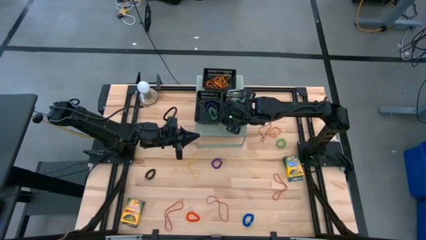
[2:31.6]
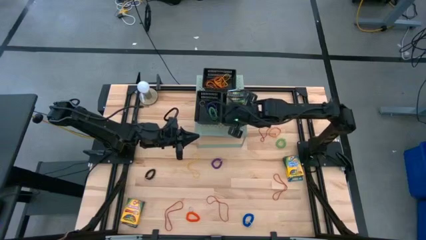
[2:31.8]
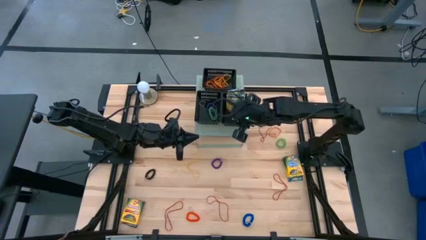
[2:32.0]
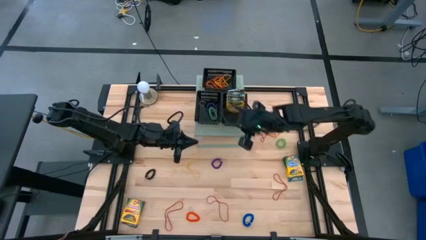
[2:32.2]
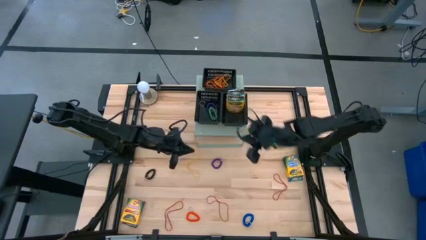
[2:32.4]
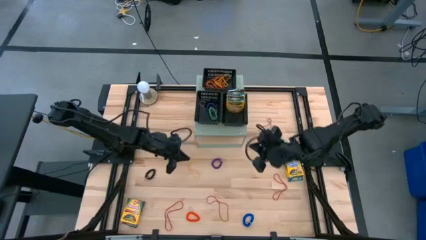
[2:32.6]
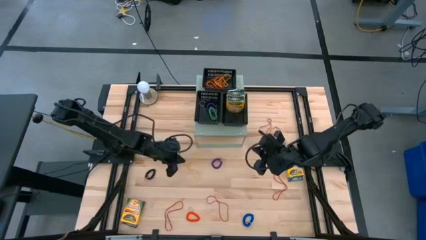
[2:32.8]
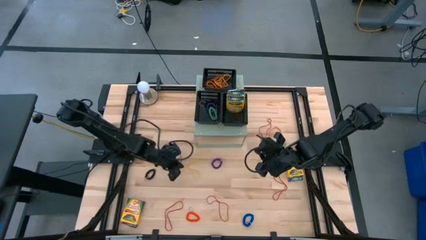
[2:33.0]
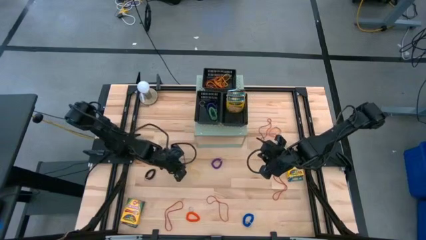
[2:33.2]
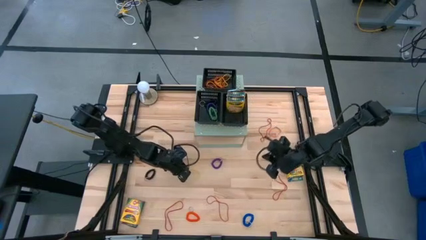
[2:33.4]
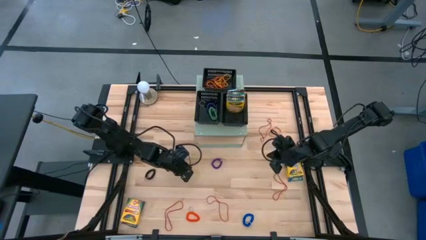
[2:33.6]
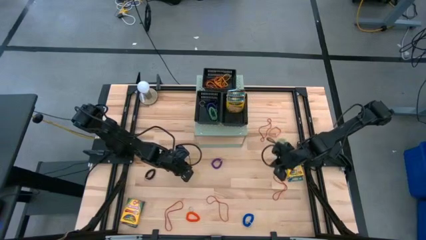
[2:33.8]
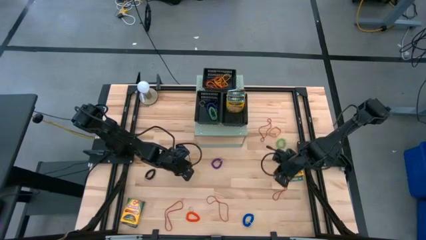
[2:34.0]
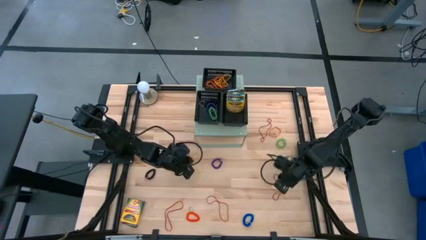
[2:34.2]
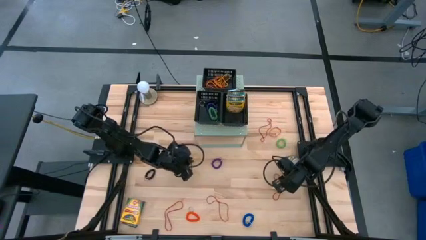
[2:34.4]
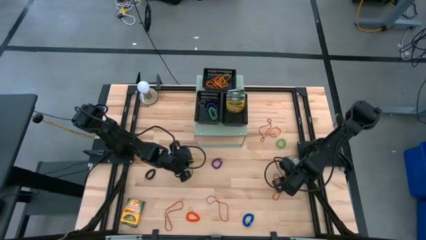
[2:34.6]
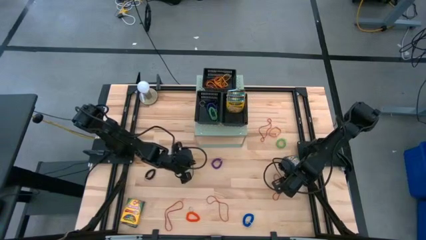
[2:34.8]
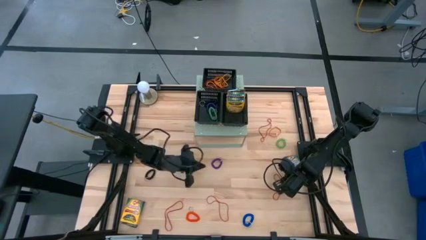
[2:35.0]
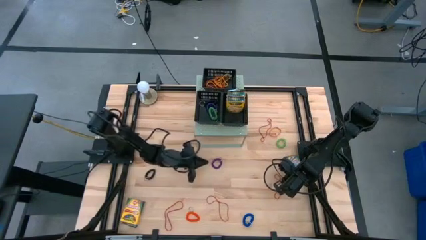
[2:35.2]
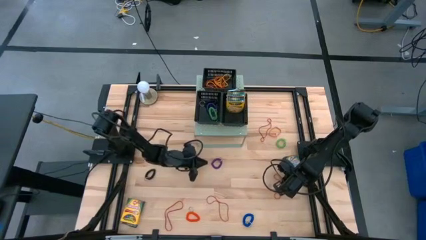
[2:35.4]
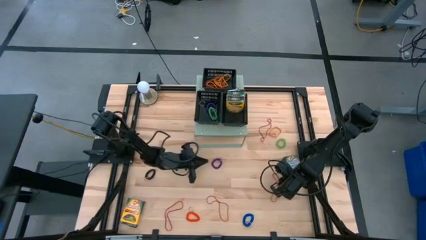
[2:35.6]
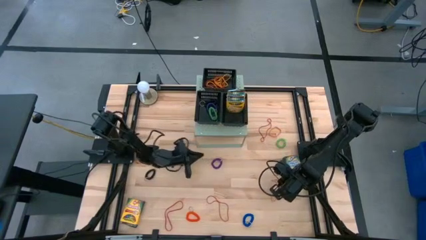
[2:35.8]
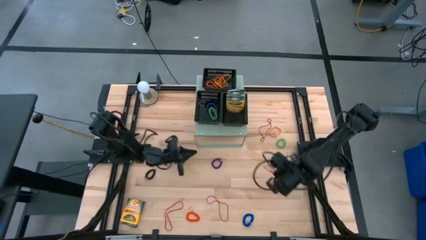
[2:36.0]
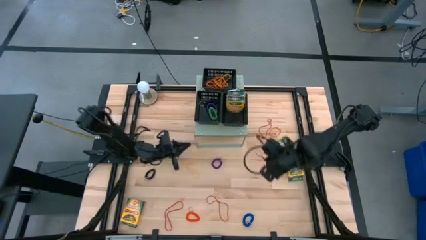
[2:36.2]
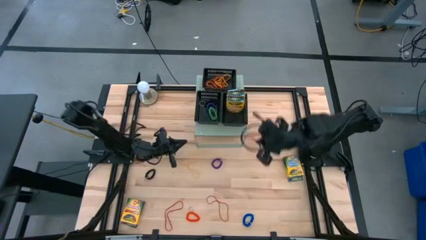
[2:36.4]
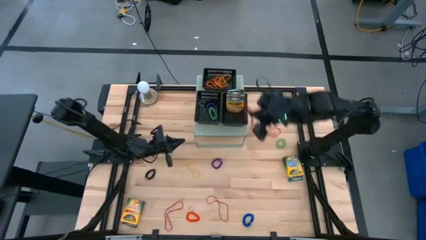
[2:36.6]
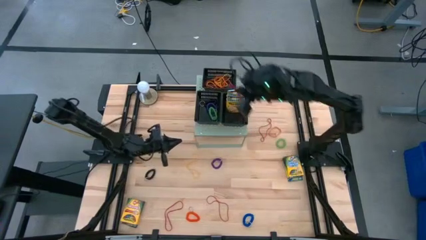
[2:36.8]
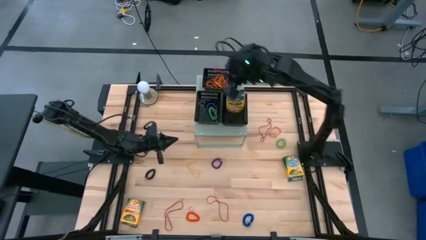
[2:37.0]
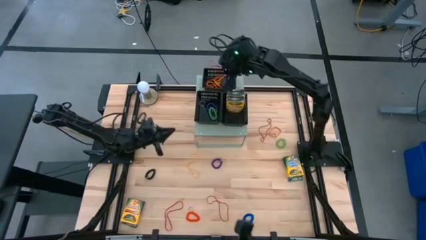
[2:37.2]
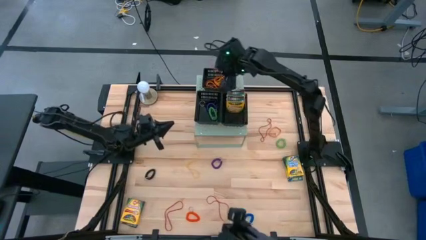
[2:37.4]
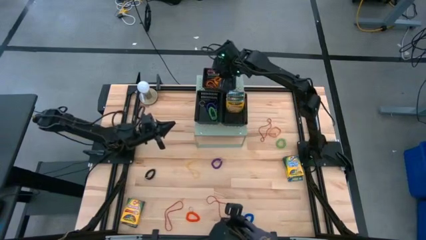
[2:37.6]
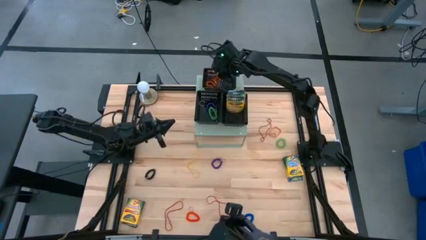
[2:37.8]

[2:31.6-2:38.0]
Task: Pick & Place Office Desk Supplies
Put the red rubber band into the top black bin

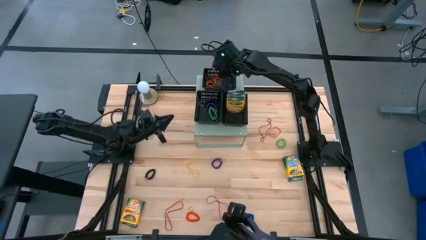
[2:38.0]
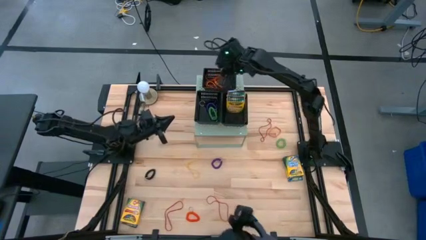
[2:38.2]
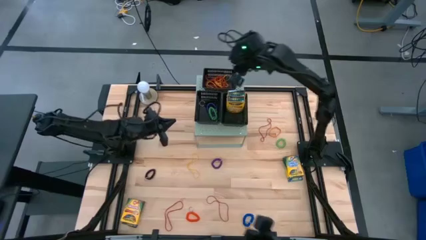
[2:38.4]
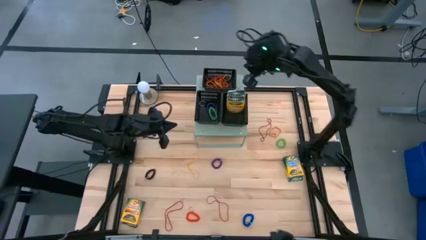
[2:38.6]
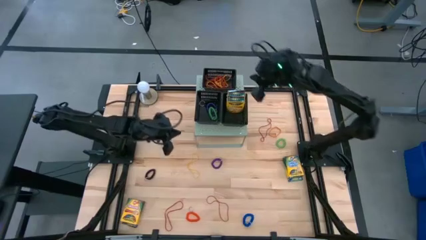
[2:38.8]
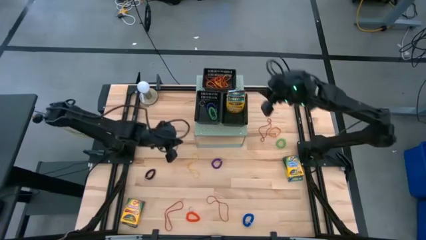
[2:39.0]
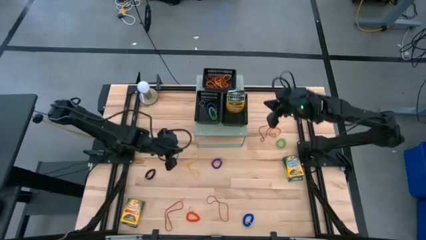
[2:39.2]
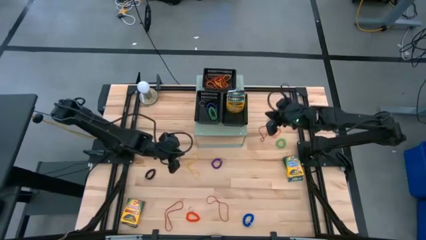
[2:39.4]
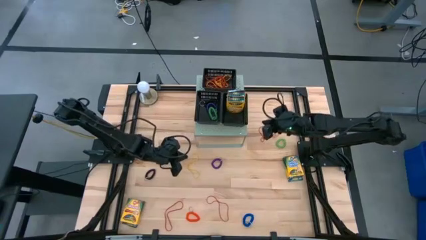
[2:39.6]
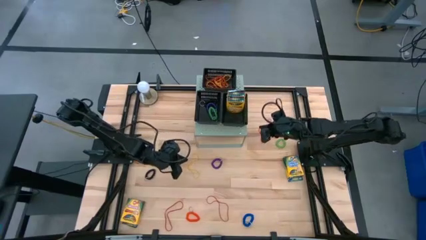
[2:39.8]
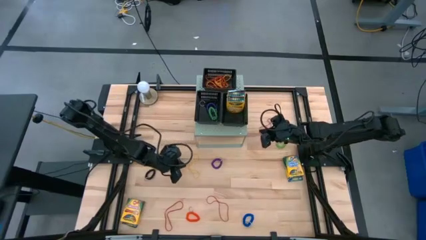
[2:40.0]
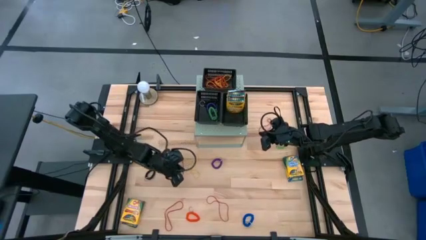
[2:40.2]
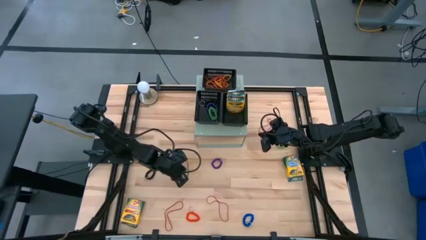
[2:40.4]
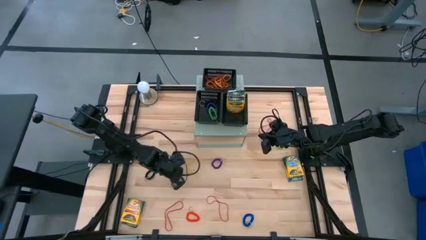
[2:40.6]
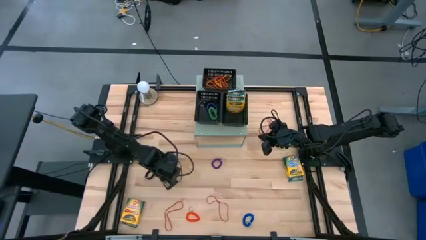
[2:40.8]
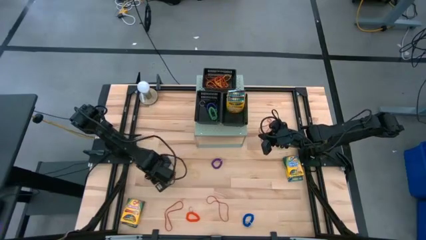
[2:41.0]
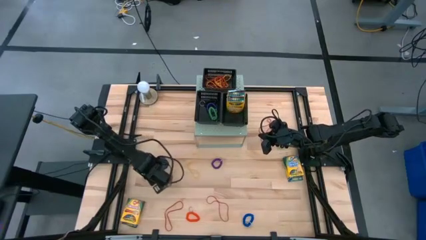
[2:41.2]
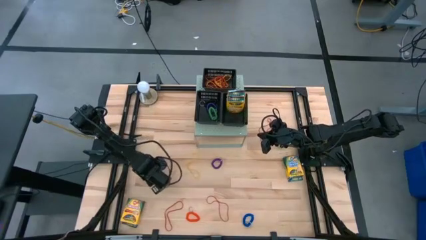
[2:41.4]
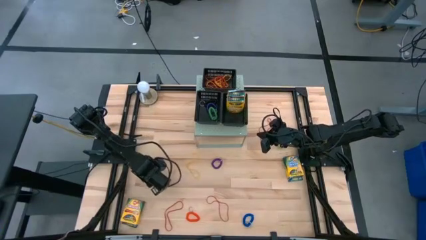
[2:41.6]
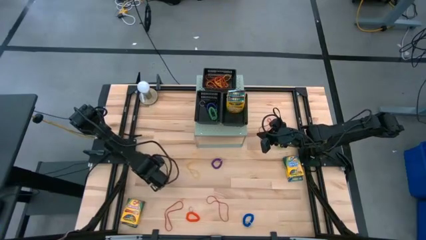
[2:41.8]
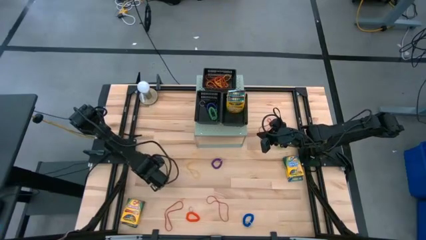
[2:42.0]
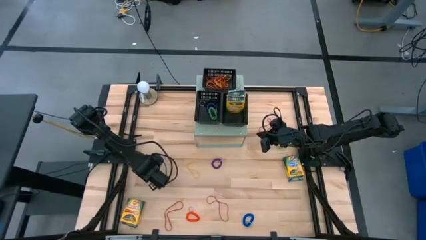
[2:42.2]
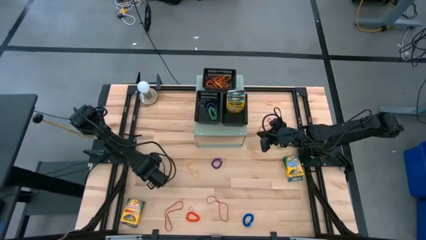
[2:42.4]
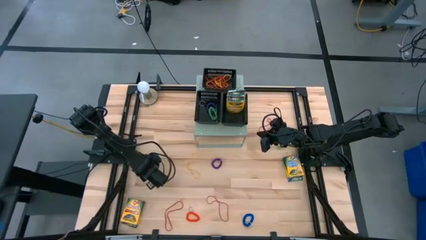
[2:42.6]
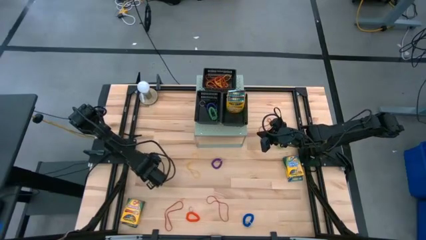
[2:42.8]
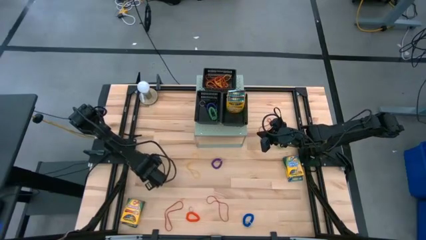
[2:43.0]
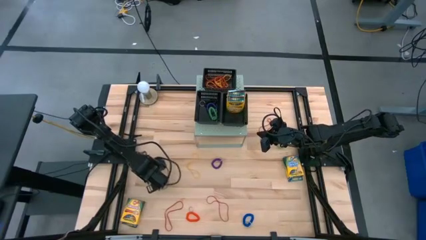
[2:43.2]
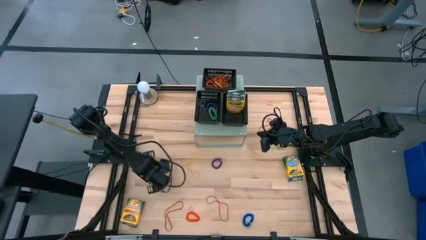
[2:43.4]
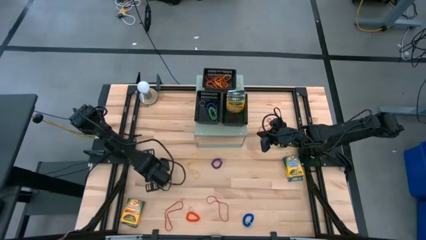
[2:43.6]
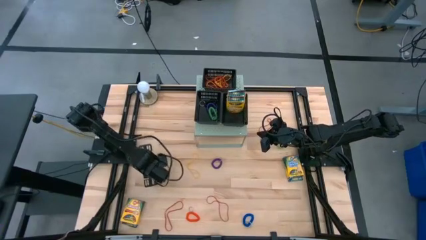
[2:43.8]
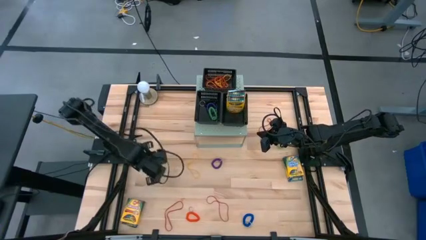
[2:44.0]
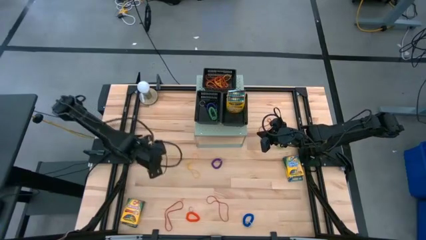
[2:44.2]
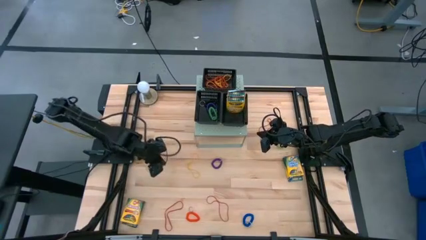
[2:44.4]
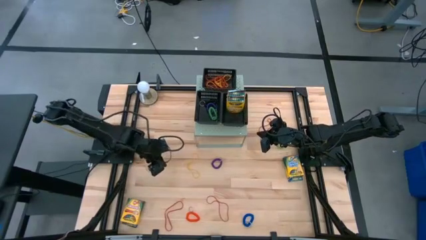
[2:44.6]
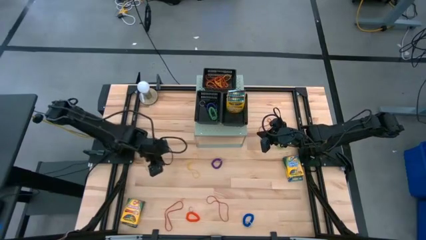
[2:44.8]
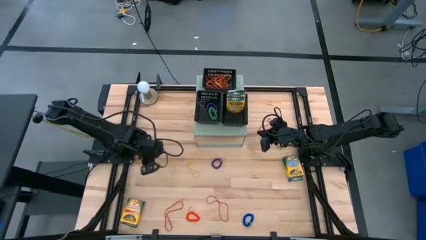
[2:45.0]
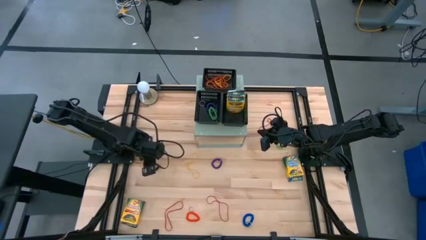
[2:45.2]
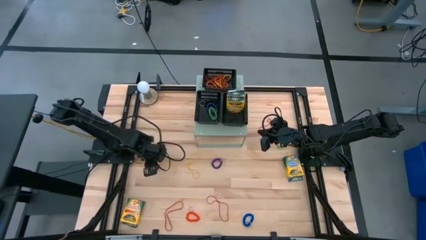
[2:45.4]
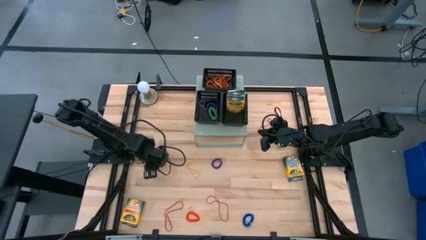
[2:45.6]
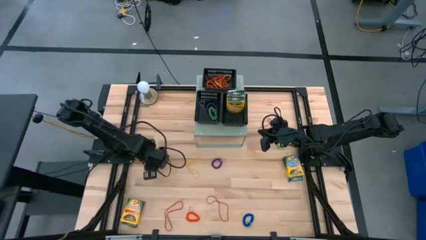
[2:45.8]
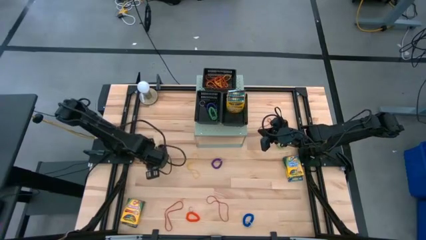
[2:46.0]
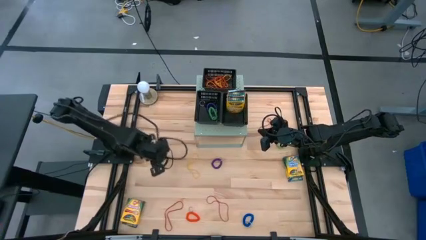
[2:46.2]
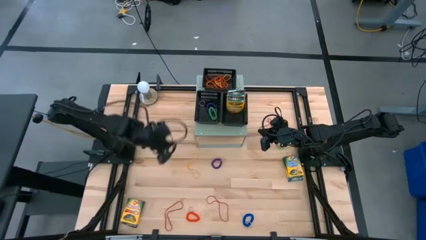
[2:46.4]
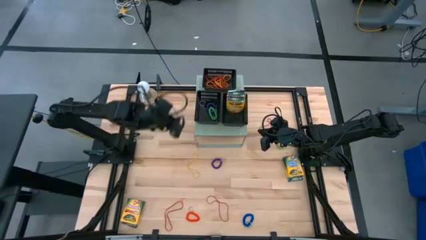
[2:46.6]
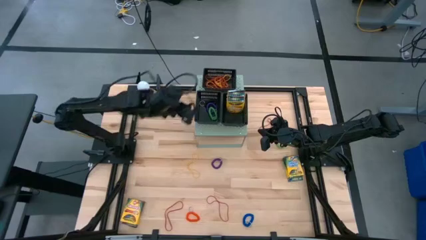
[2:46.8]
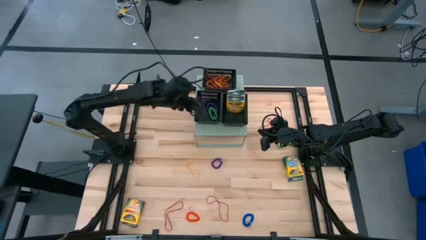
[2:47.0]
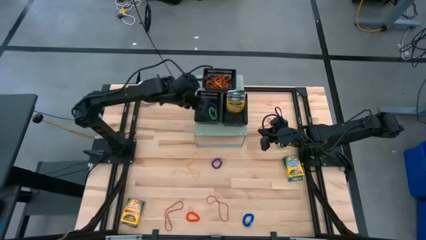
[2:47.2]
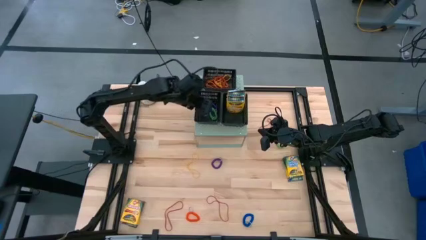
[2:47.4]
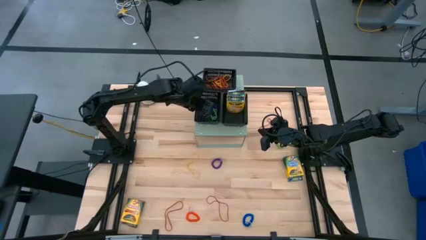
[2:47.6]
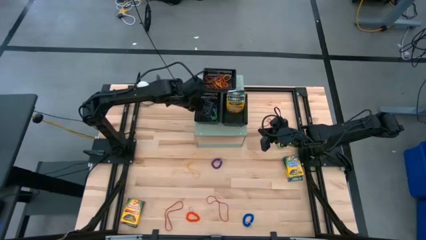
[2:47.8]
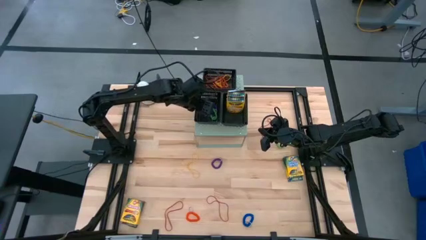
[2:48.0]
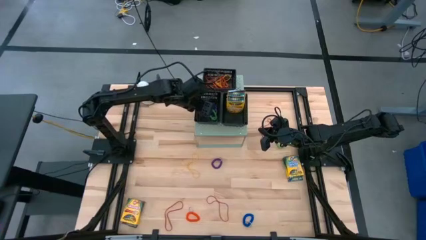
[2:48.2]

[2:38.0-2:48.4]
Put the black spiral keychain into the bottom left black bin

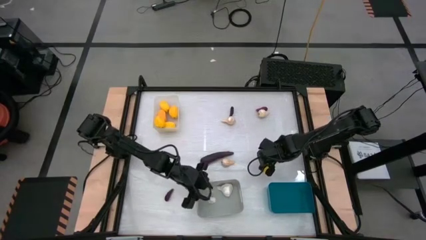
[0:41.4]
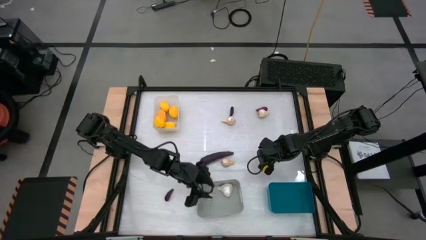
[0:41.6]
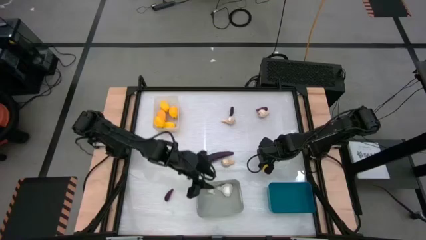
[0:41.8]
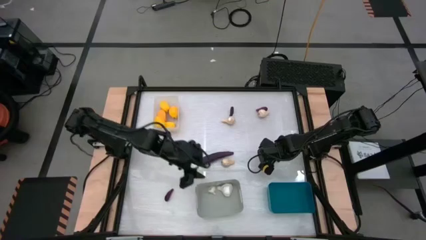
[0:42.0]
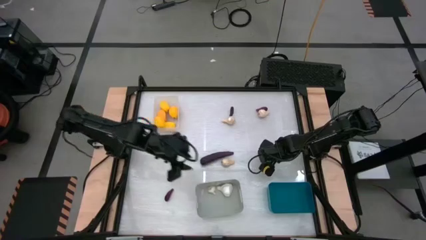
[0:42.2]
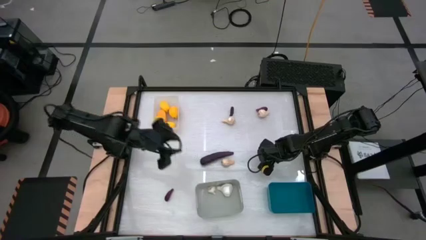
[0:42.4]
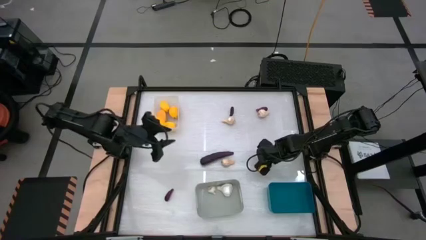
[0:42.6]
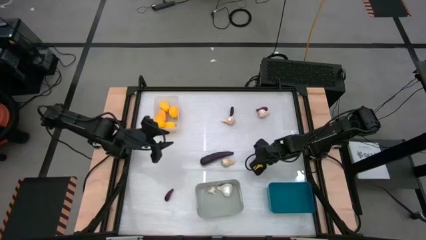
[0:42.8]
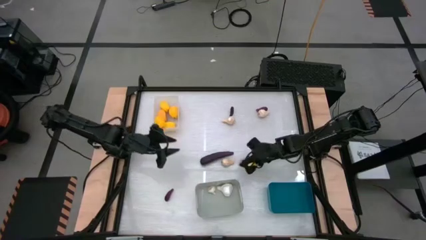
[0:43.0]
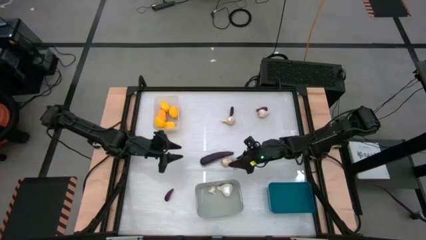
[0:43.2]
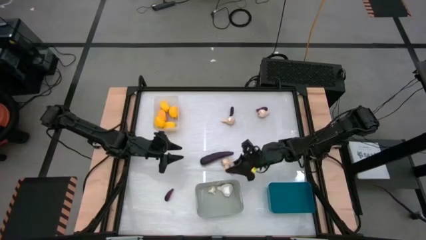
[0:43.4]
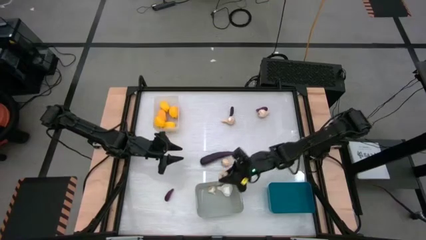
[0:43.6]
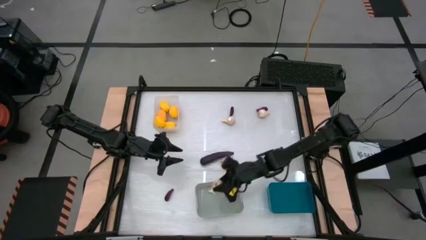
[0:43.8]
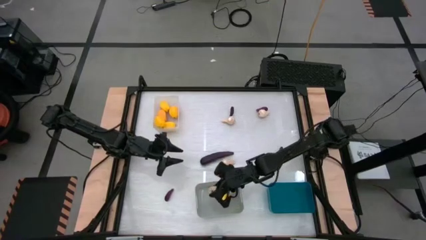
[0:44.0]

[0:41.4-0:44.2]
Task: Sort produce into baskets
Put the garlic into the gray bin
